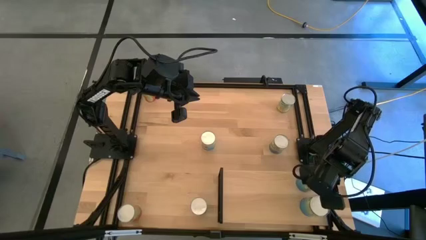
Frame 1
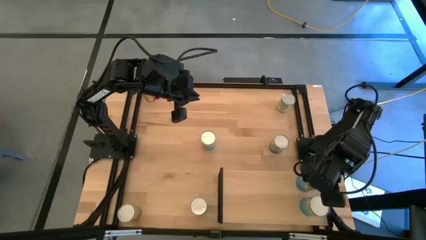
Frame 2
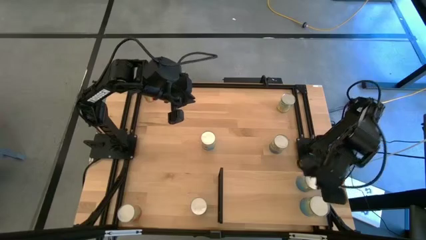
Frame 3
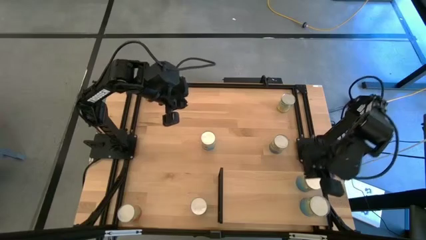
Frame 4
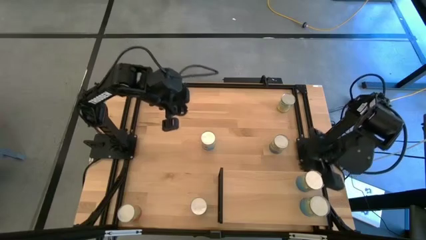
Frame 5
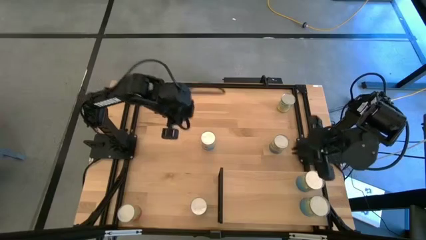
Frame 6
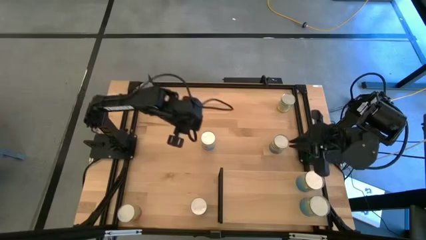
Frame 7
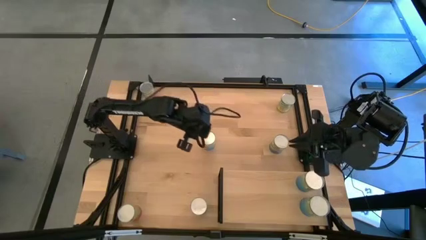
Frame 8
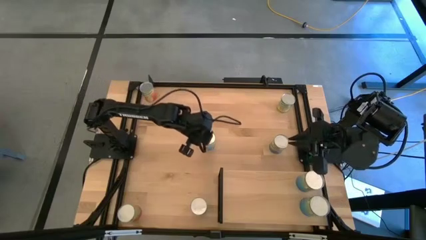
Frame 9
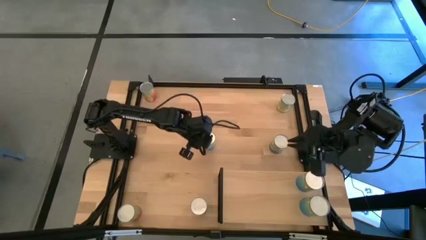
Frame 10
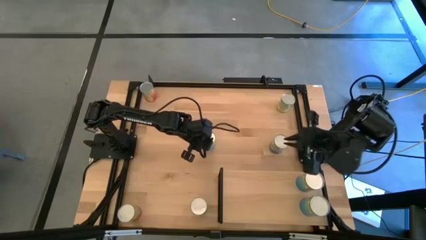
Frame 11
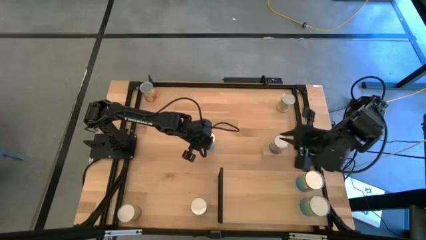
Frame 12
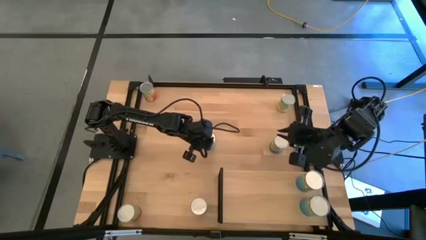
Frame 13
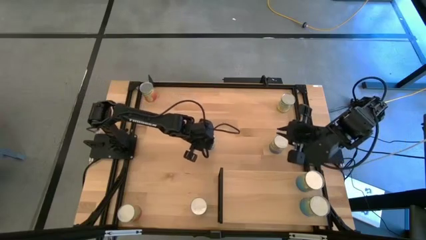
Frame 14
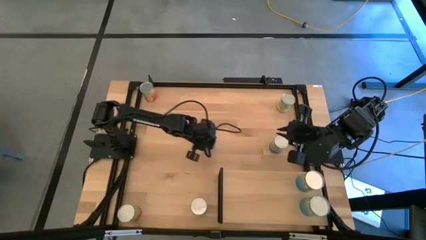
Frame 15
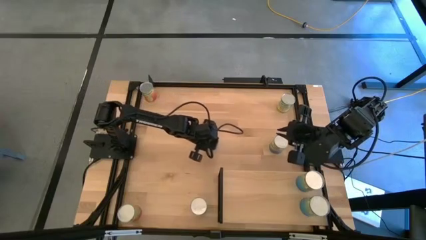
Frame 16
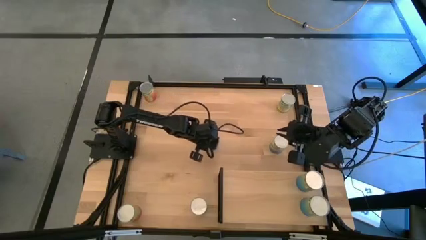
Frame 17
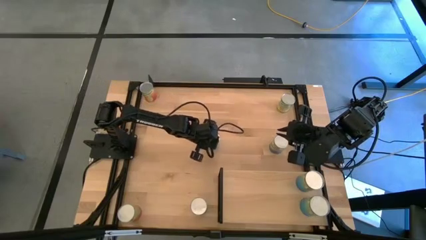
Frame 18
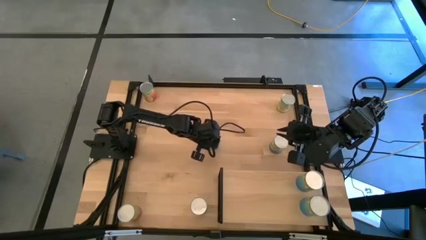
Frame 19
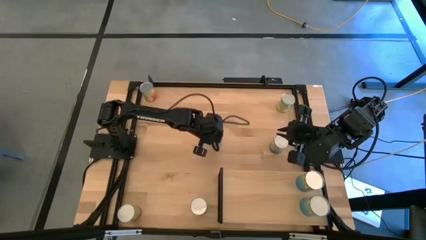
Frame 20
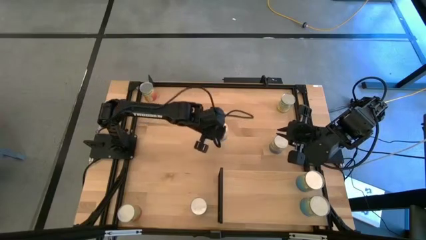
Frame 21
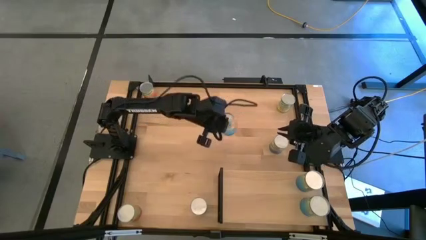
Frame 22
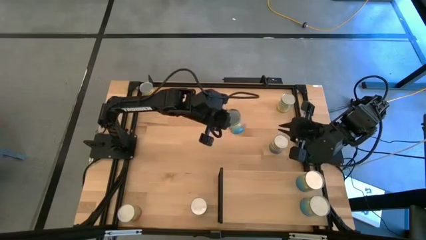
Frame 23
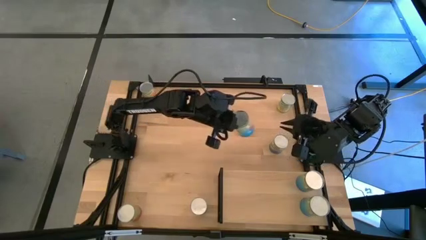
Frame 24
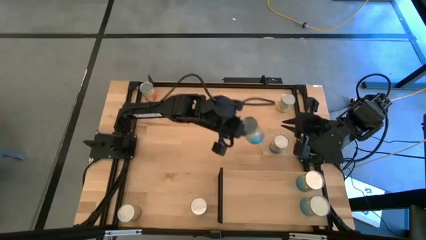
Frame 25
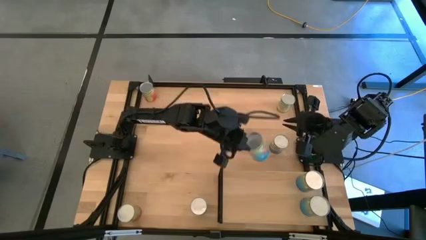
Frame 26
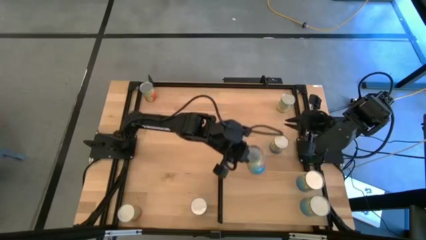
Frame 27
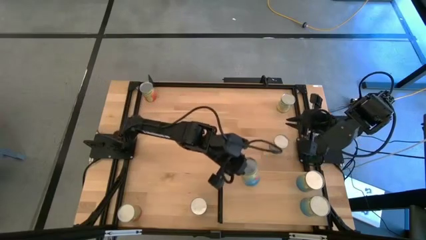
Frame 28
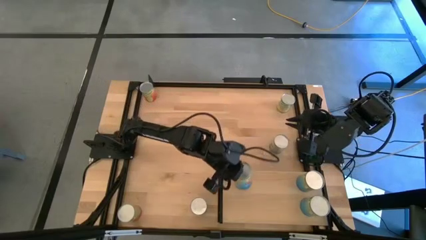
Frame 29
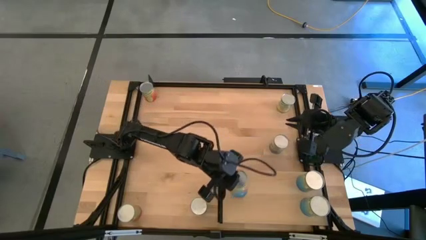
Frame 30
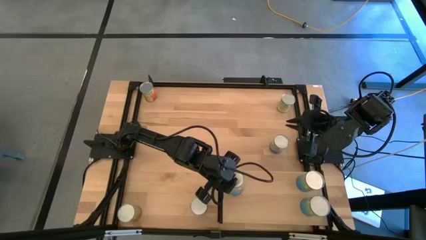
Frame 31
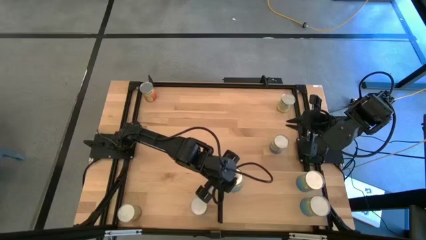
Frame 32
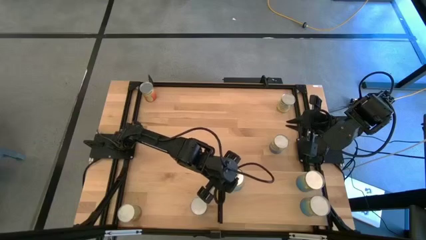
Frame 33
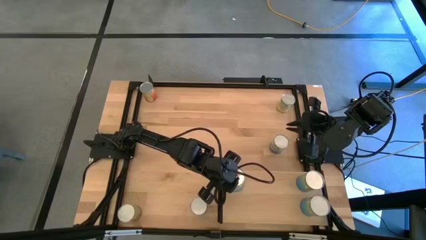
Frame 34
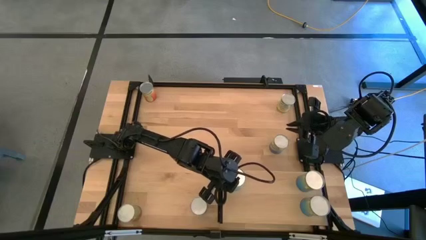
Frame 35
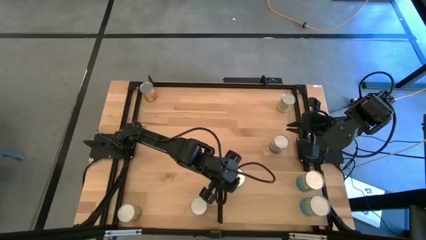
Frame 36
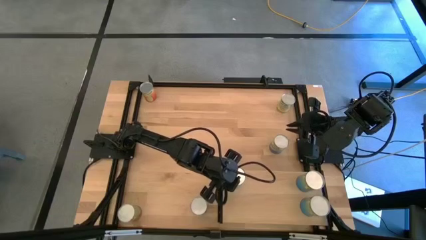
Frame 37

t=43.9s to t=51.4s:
Task: Pick and place cans onto a shelf
Put the canned tomatoes on the shelf

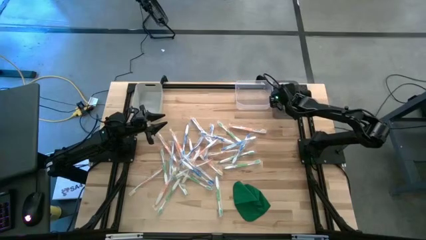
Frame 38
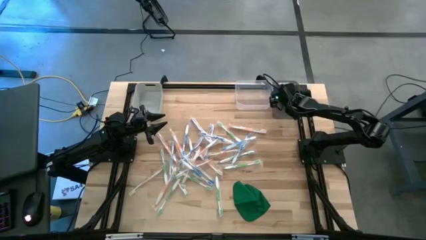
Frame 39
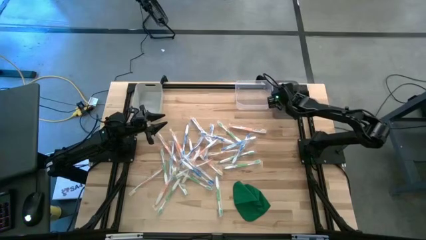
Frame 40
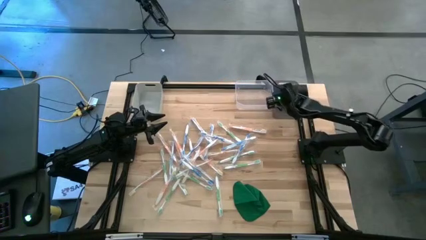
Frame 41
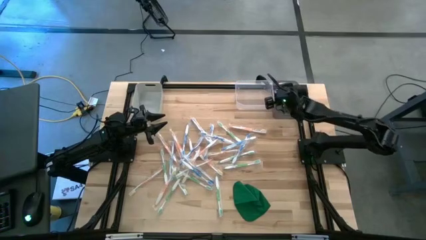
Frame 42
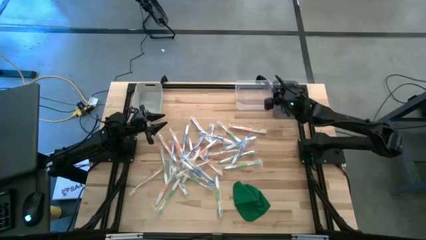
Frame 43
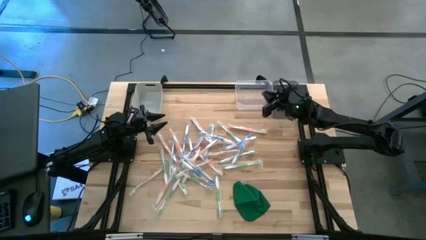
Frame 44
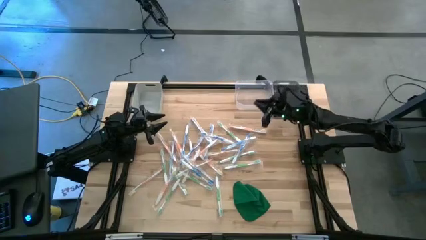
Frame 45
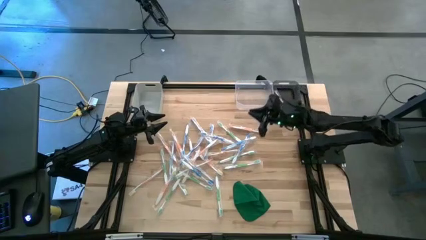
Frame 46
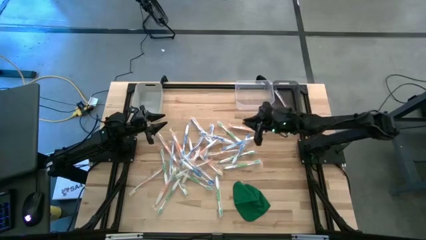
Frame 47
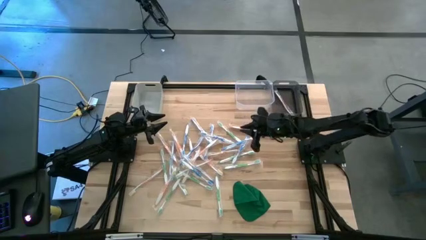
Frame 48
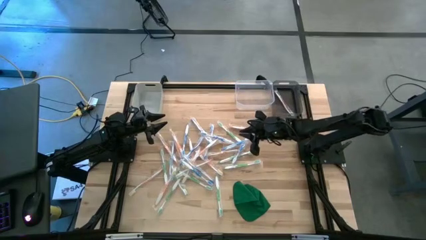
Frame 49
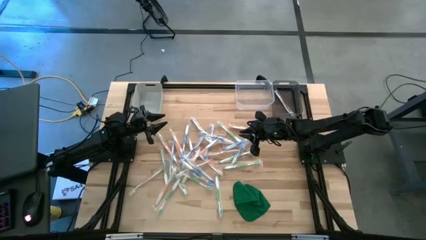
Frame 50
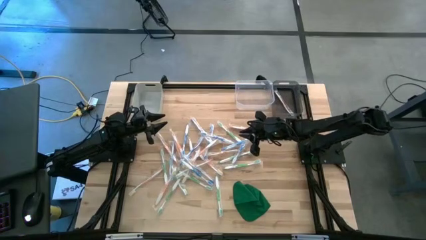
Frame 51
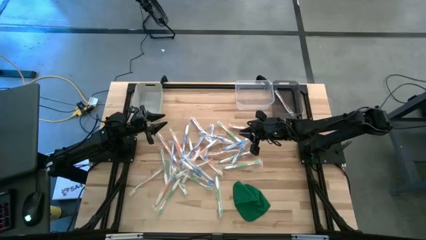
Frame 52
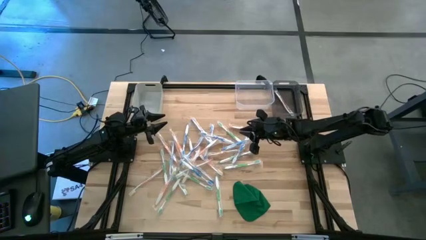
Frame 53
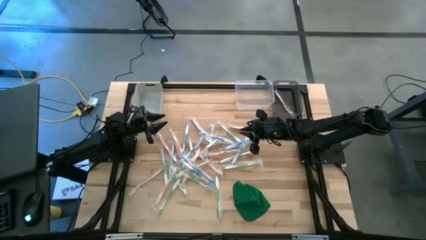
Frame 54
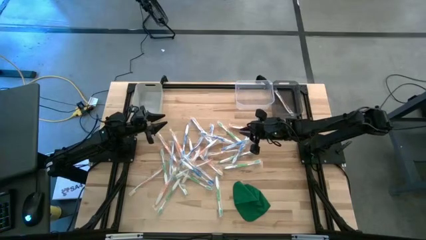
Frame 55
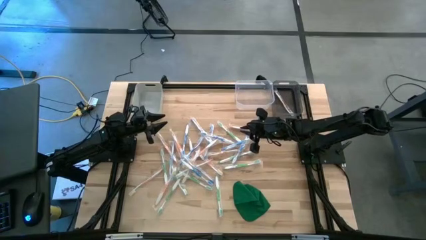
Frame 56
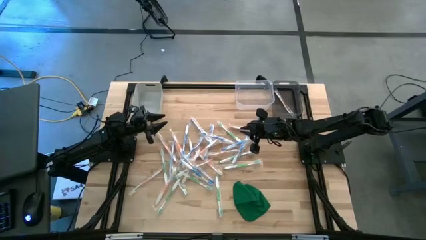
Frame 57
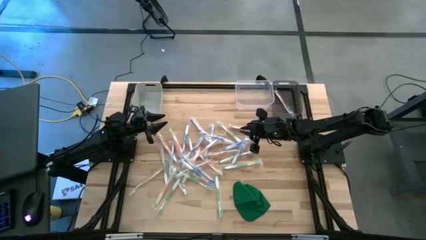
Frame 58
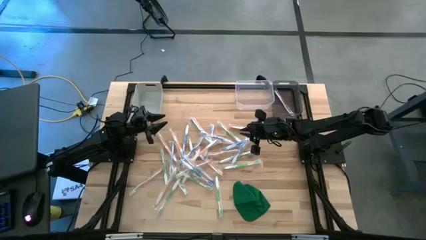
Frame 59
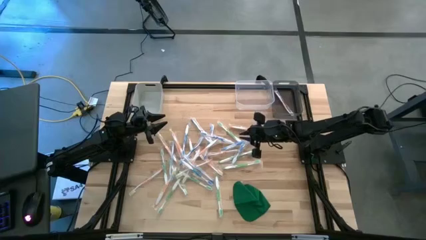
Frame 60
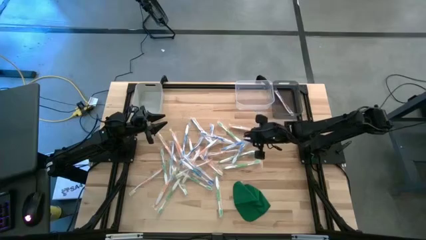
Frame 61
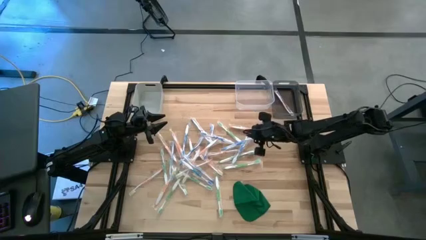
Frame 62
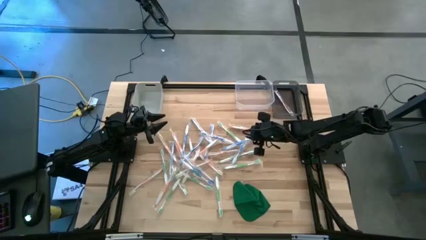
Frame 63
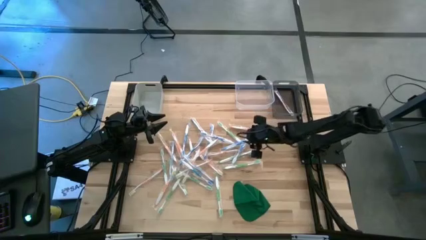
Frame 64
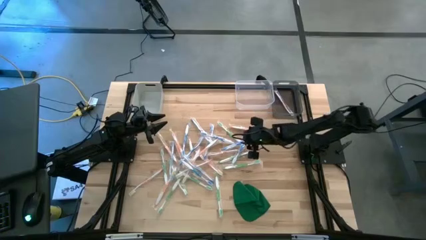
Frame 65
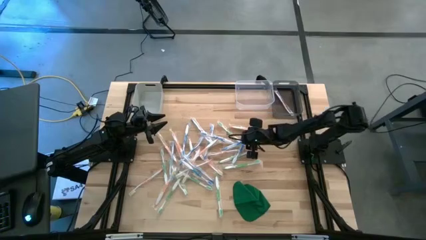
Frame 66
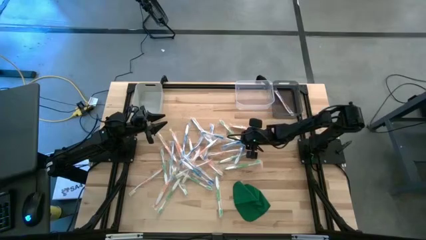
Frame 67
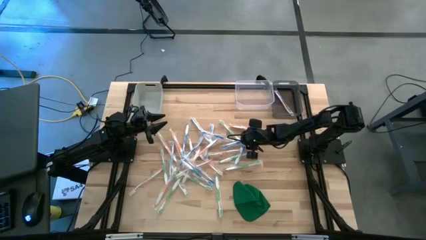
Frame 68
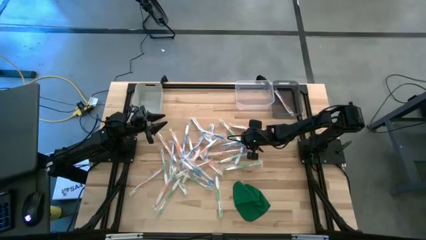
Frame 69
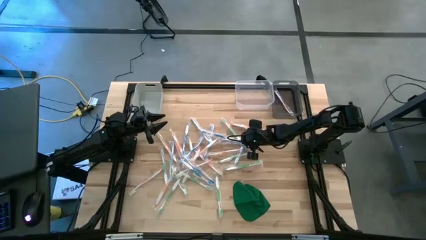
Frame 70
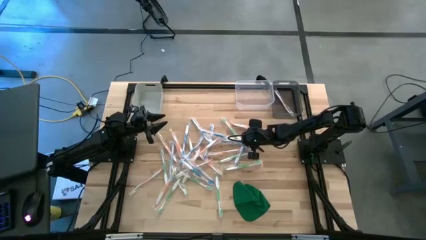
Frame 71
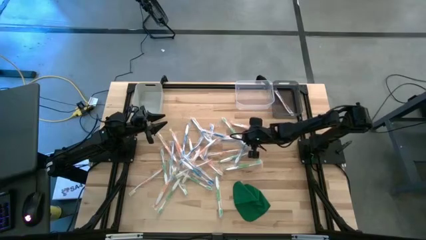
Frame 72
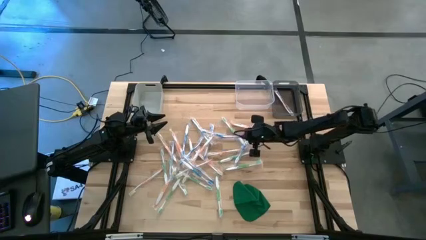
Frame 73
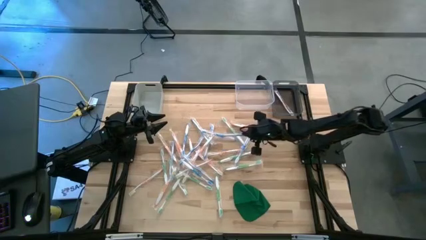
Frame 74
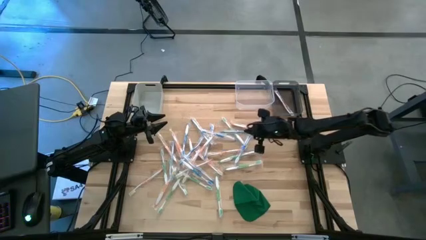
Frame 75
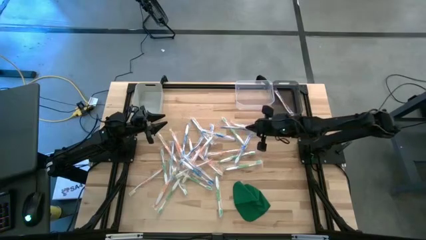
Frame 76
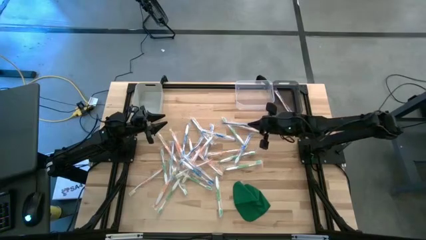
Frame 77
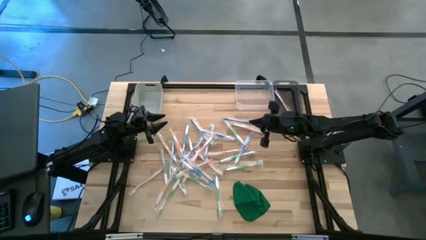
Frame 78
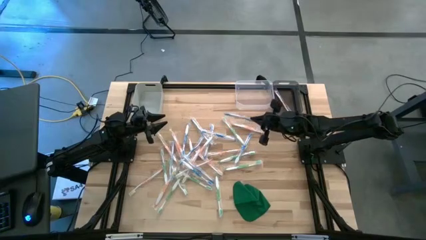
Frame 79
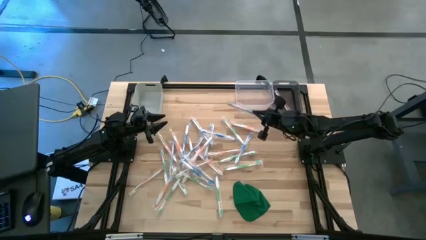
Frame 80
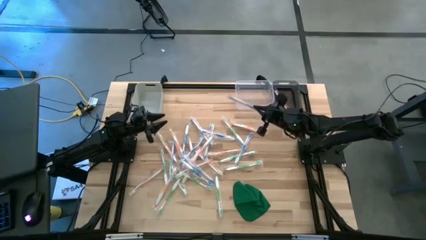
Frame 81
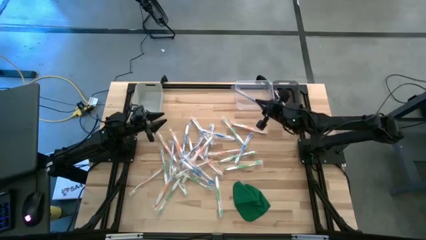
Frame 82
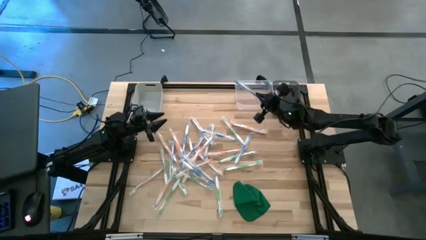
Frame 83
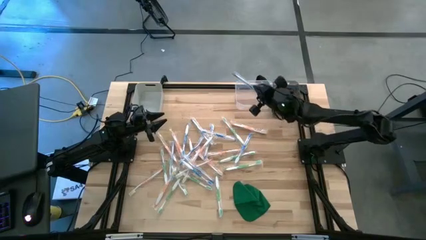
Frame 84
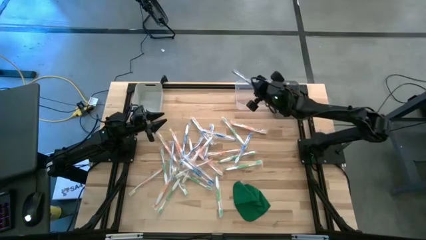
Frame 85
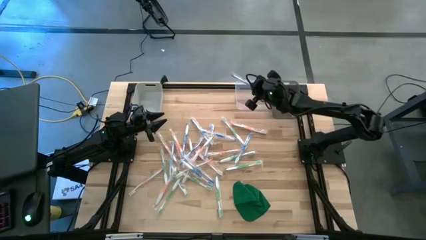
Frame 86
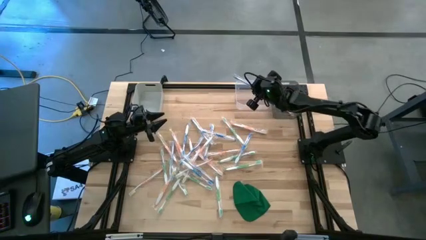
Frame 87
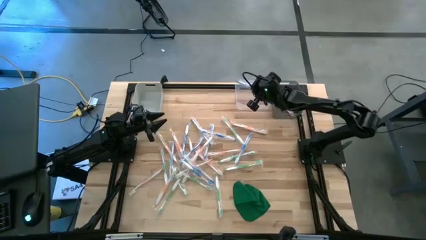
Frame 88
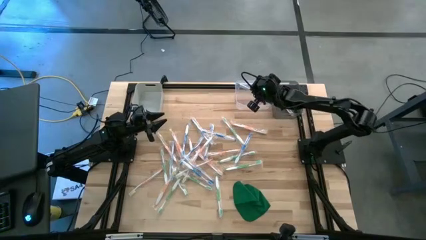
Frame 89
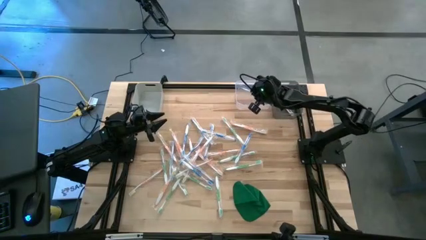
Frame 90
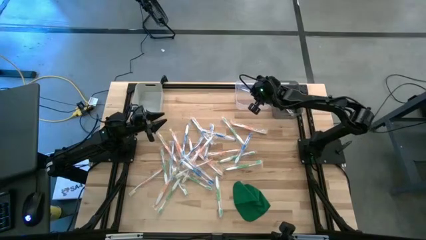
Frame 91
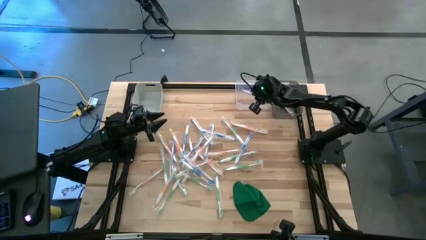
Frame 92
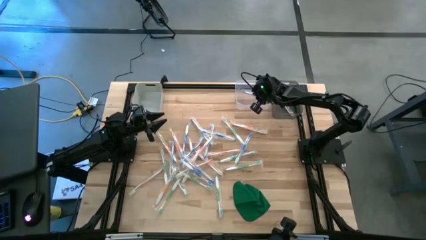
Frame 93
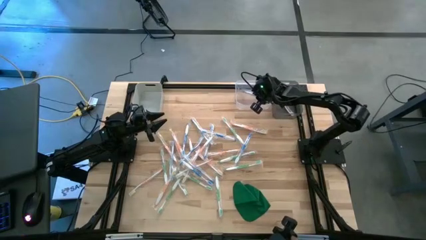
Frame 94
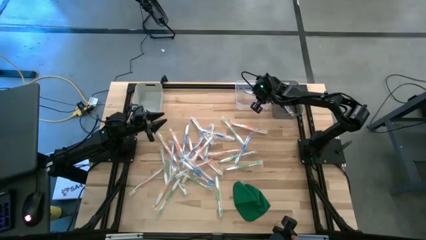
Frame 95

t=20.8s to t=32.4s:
Task: Pick & Place Toothbrushes
Put the blue toothbrush into the transparent bin
